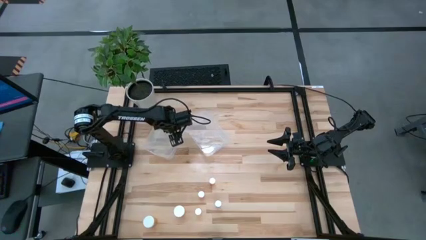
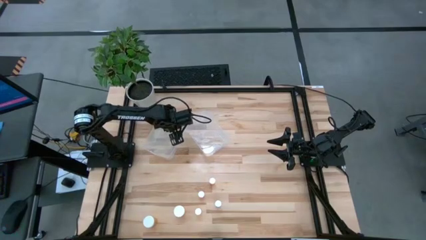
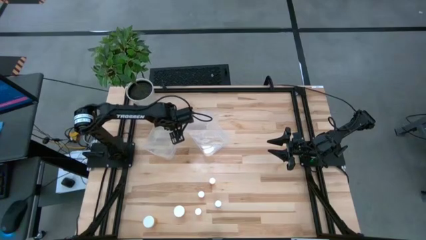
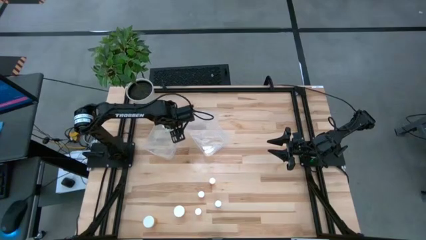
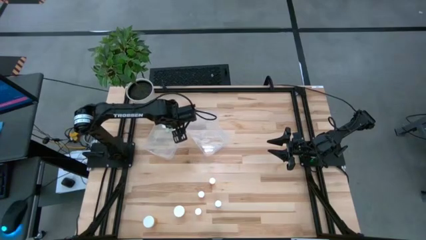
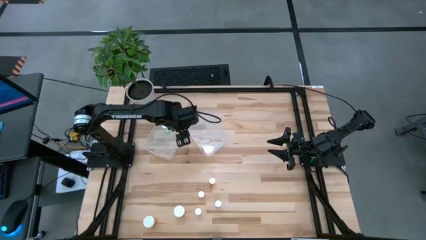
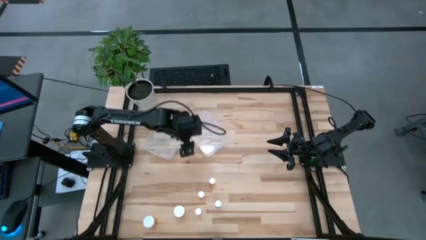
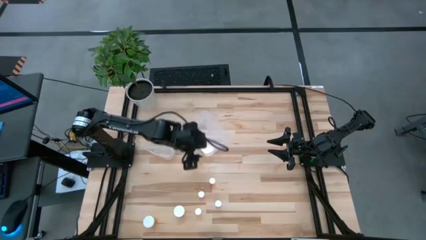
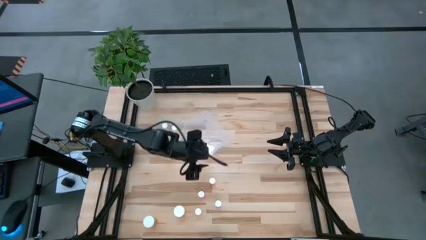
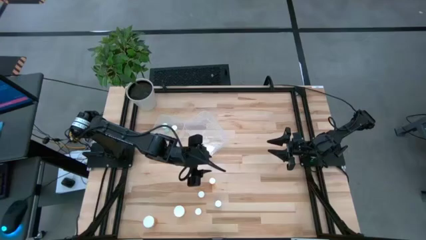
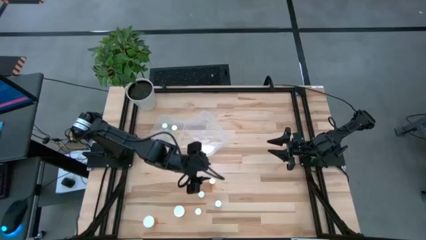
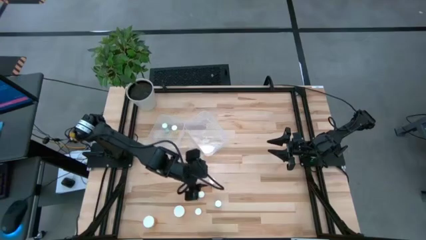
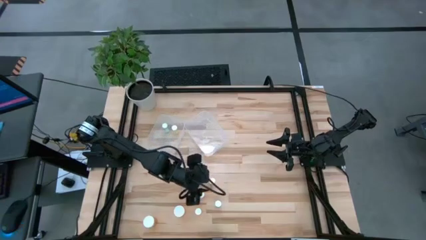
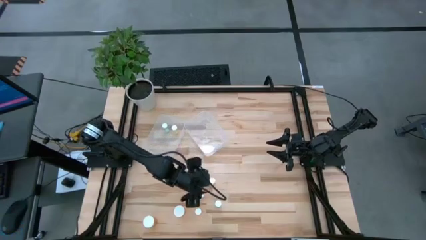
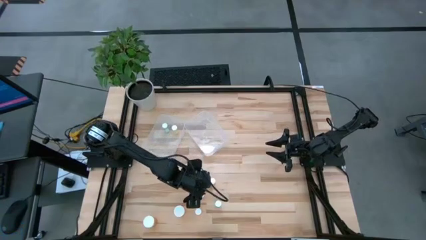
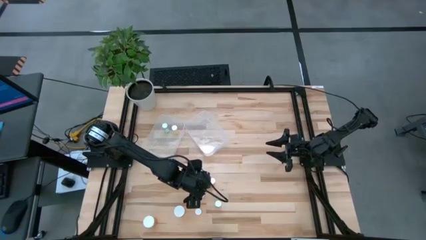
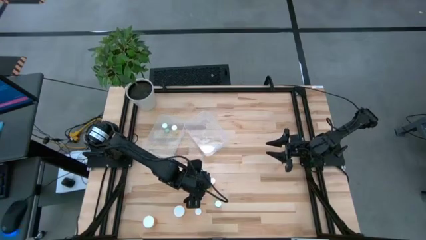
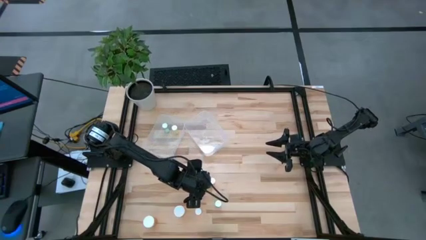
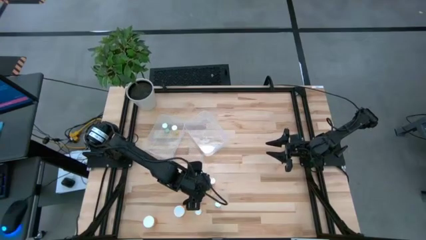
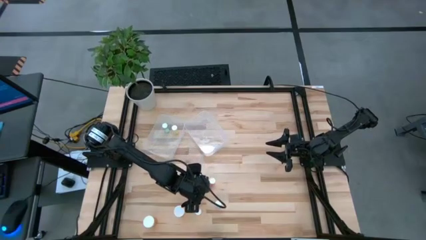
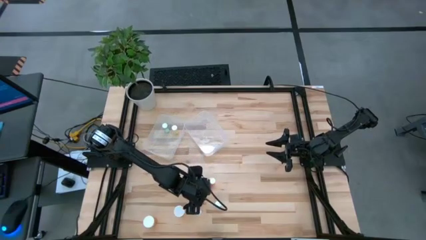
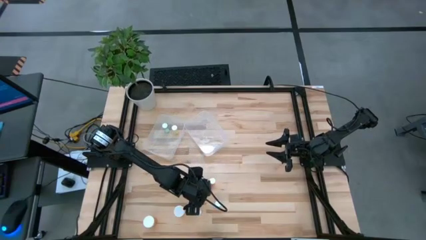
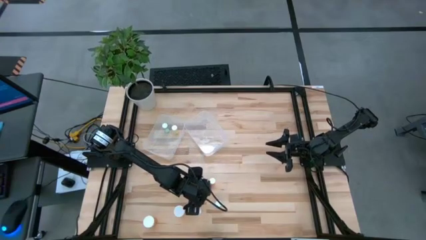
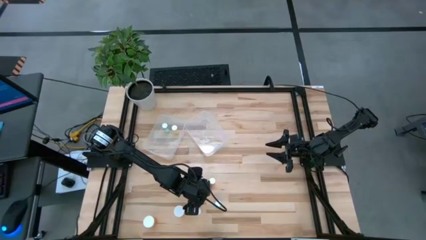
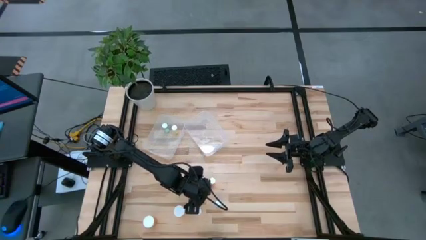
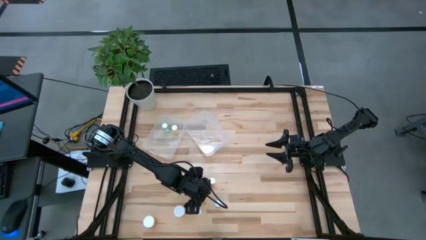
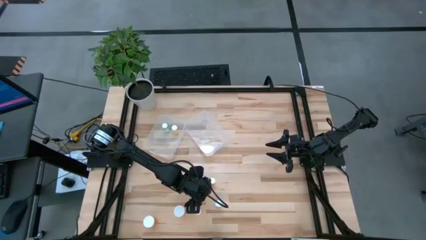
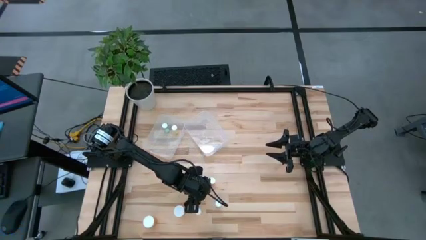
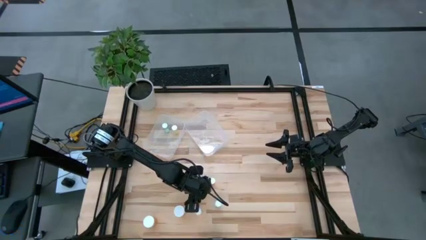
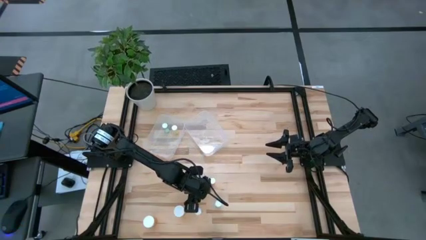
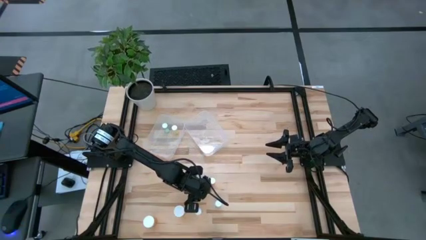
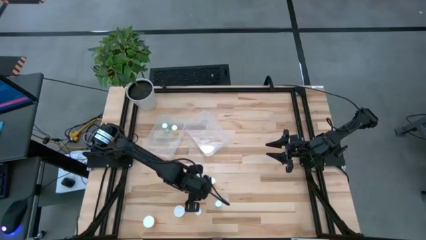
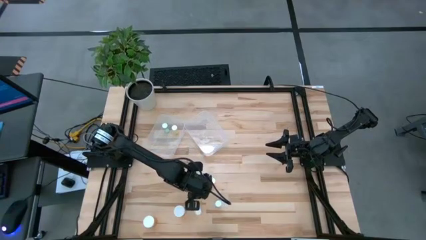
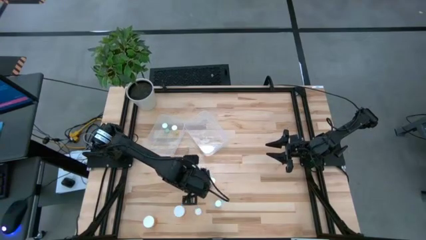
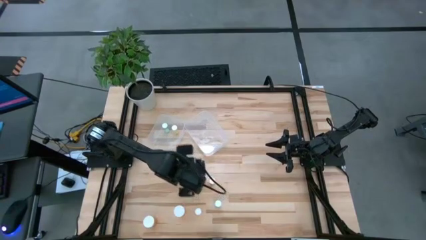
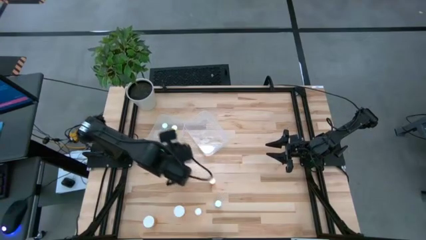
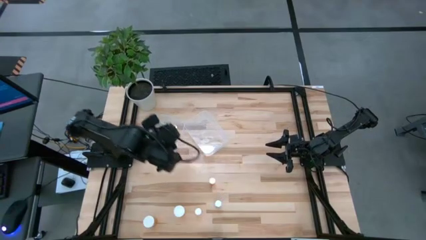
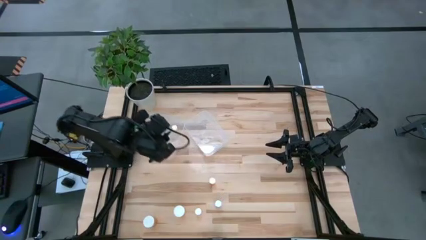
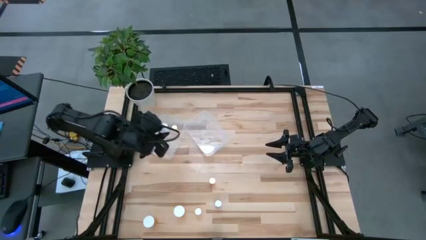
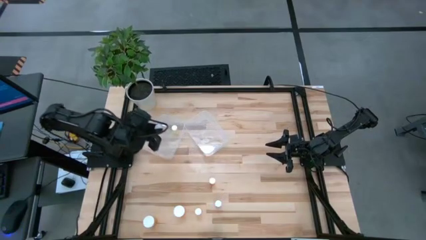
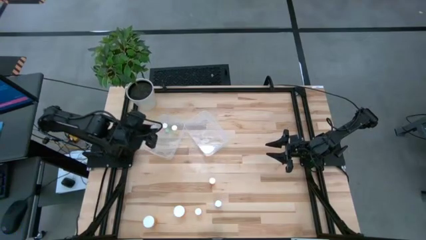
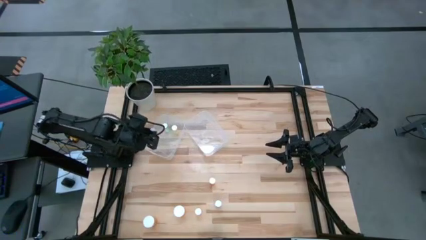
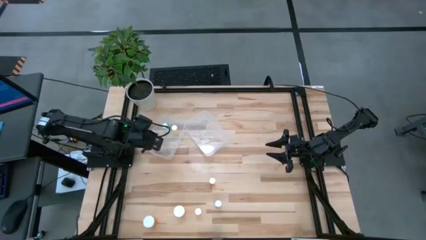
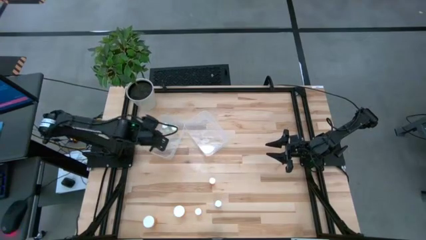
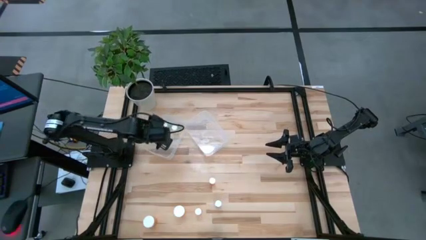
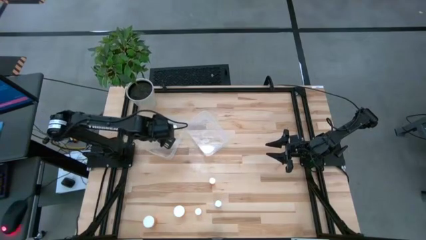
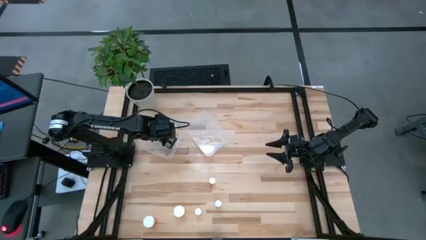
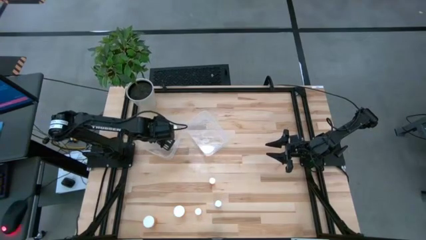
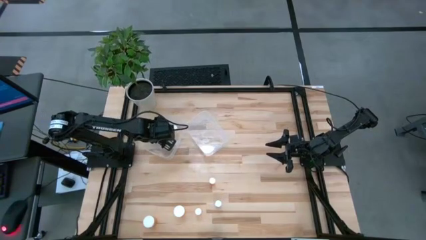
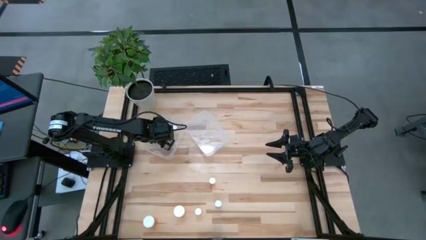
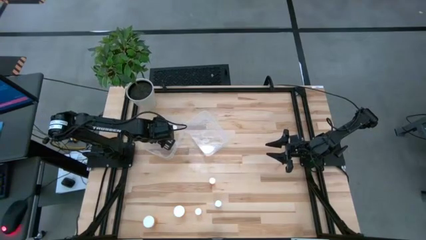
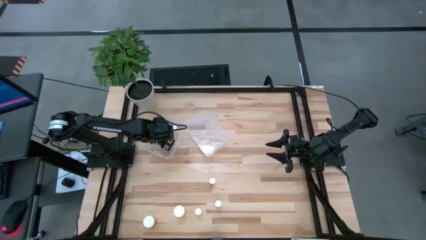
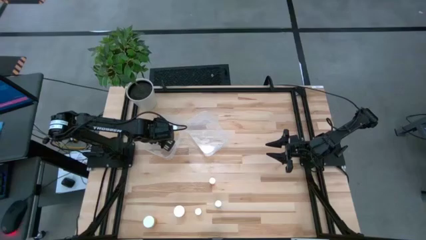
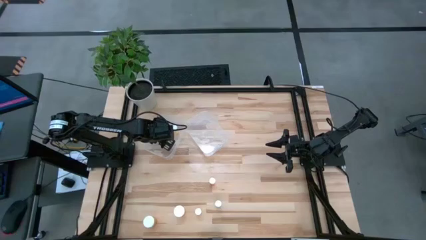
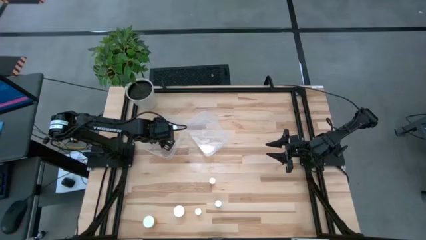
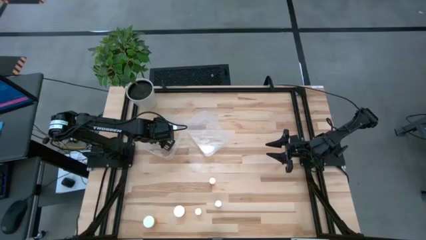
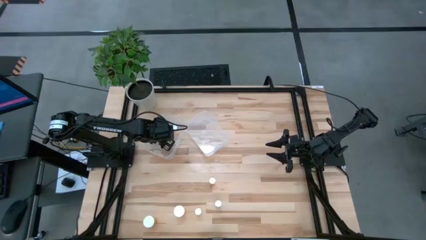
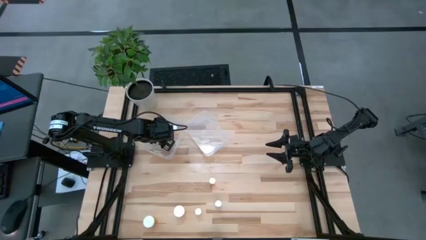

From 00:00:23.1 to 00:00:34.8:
Task: Pick and place medicine bottles into bin by pill shape (circle, oval)
Put the pink tablet bottle into the left transparent bin
